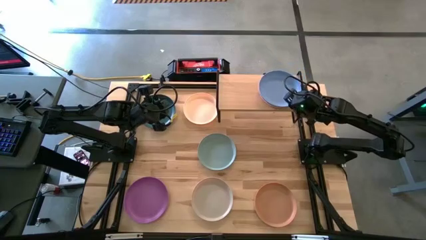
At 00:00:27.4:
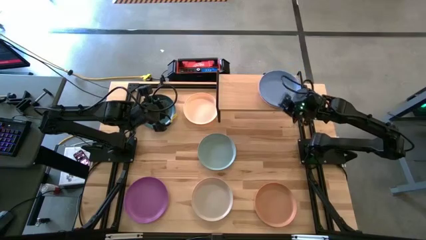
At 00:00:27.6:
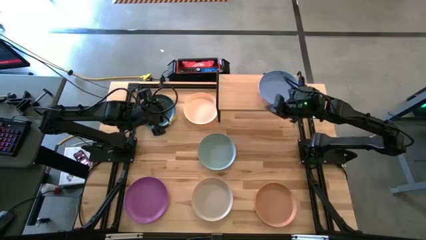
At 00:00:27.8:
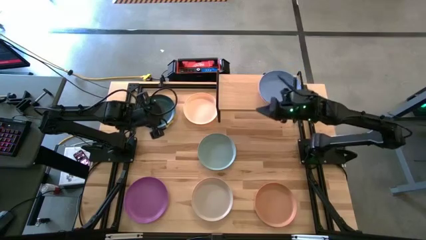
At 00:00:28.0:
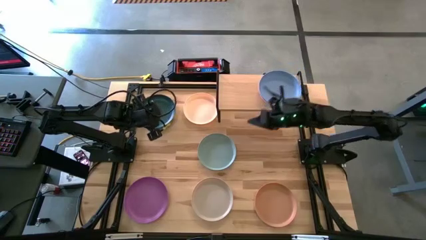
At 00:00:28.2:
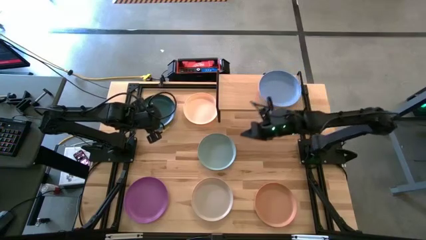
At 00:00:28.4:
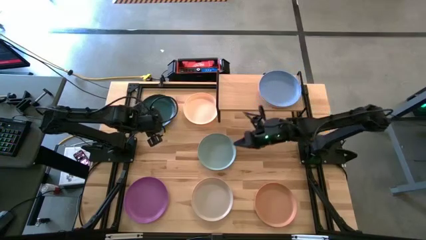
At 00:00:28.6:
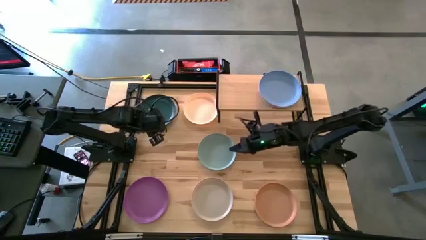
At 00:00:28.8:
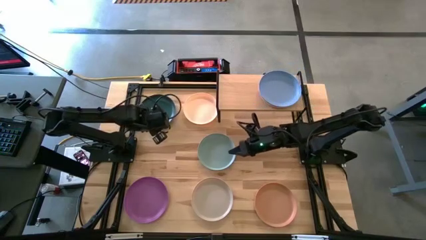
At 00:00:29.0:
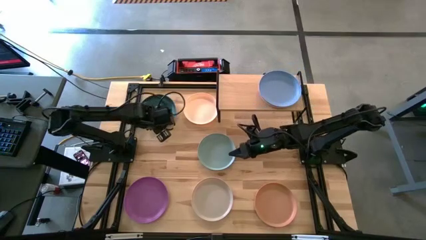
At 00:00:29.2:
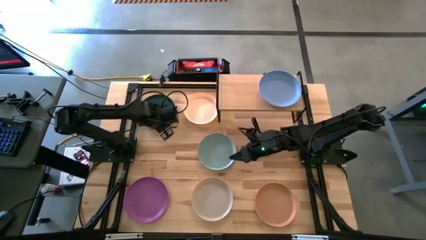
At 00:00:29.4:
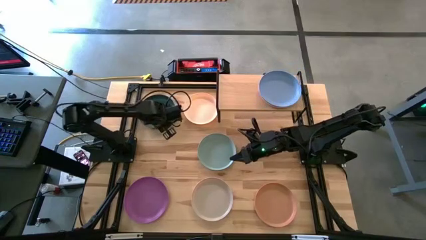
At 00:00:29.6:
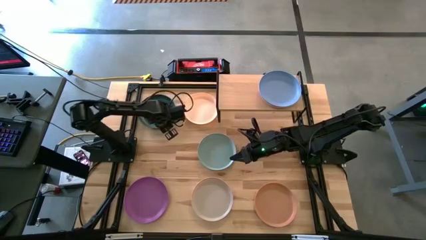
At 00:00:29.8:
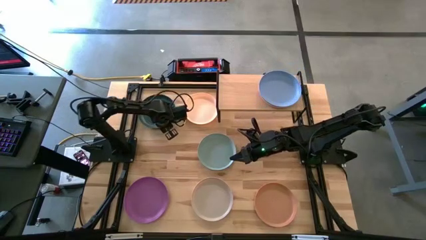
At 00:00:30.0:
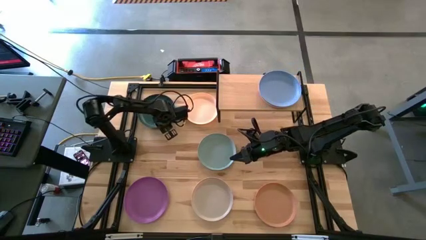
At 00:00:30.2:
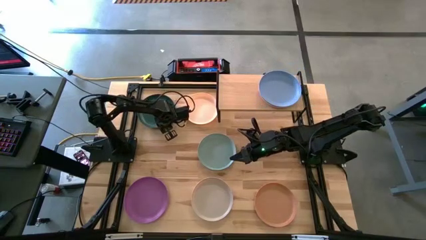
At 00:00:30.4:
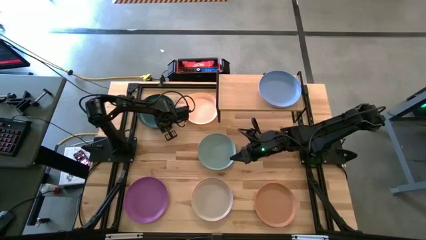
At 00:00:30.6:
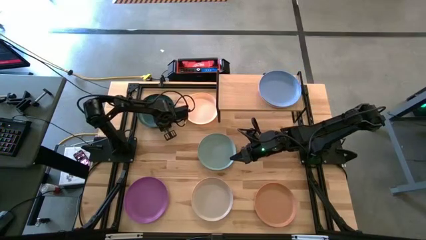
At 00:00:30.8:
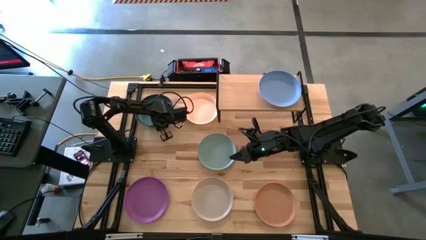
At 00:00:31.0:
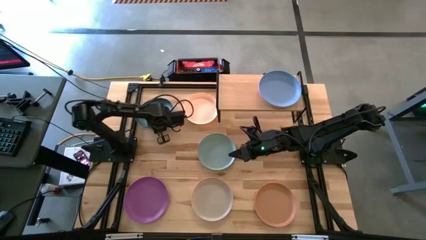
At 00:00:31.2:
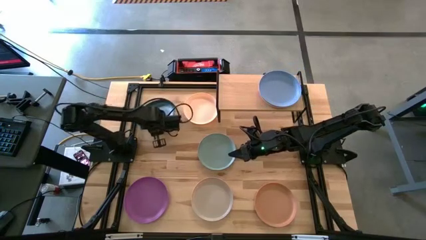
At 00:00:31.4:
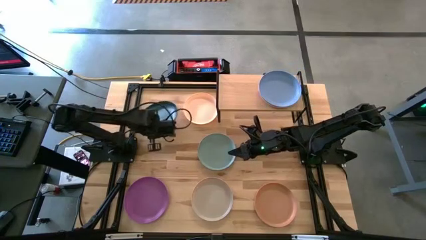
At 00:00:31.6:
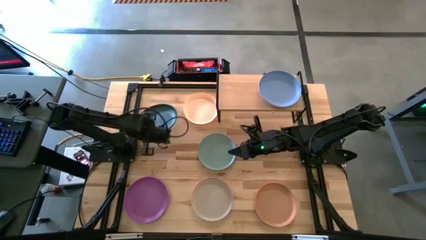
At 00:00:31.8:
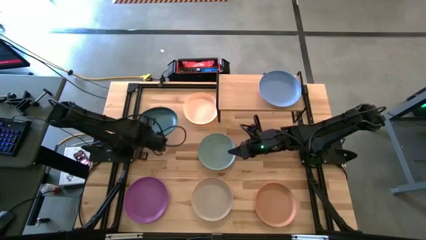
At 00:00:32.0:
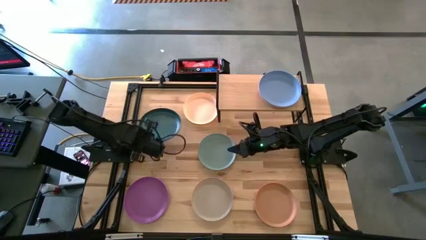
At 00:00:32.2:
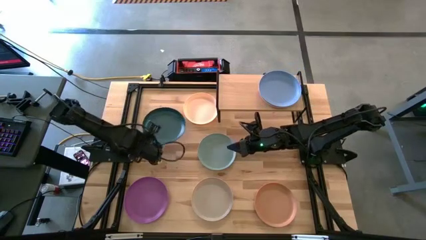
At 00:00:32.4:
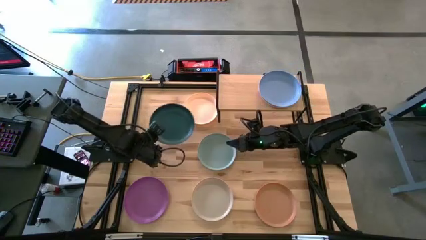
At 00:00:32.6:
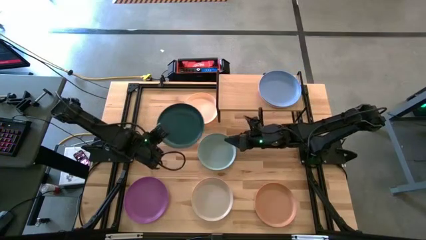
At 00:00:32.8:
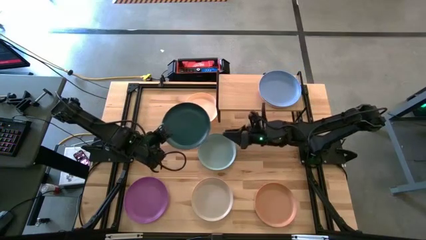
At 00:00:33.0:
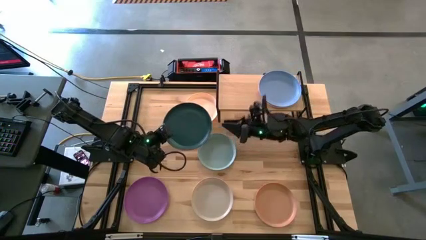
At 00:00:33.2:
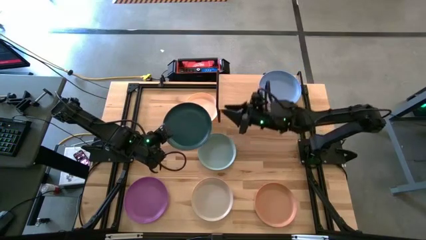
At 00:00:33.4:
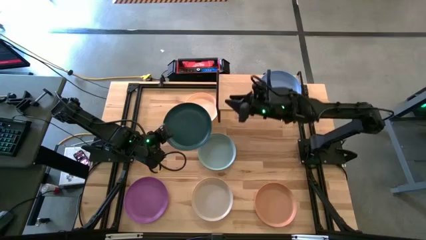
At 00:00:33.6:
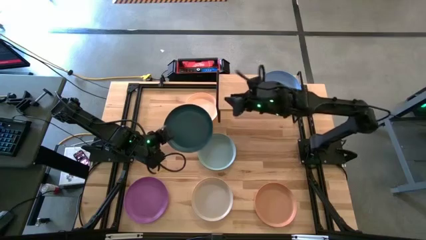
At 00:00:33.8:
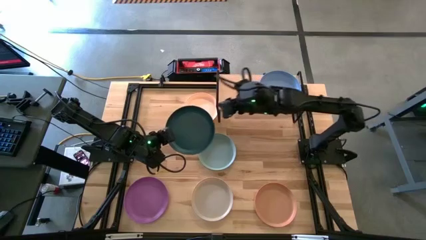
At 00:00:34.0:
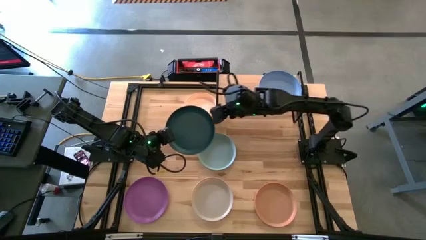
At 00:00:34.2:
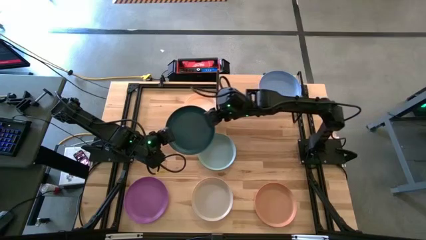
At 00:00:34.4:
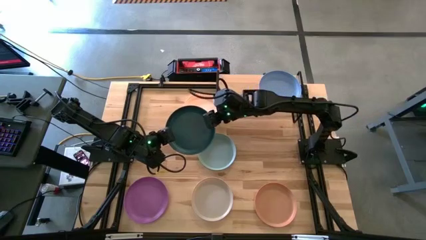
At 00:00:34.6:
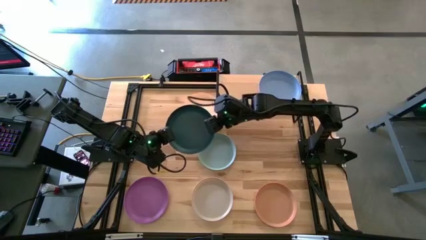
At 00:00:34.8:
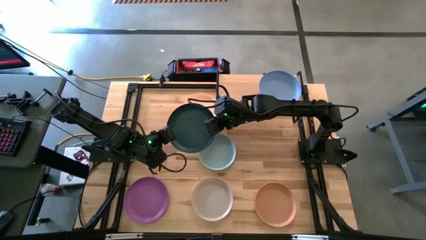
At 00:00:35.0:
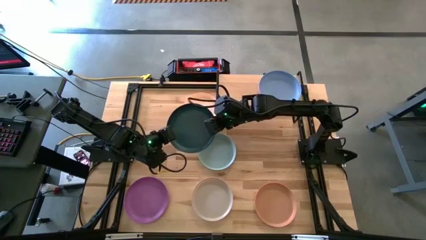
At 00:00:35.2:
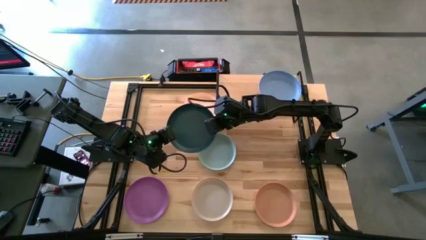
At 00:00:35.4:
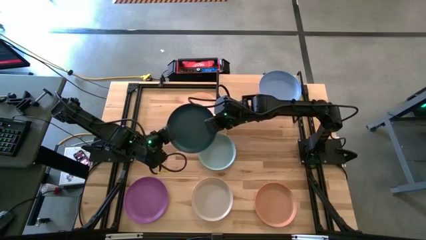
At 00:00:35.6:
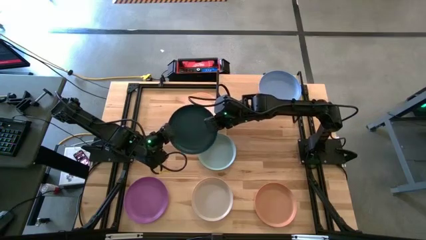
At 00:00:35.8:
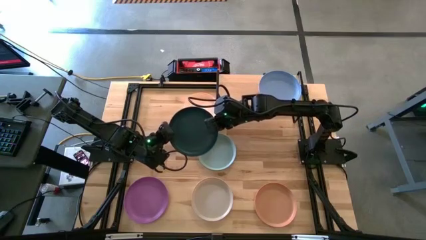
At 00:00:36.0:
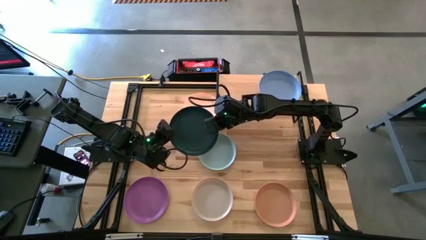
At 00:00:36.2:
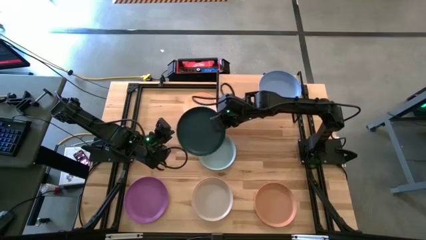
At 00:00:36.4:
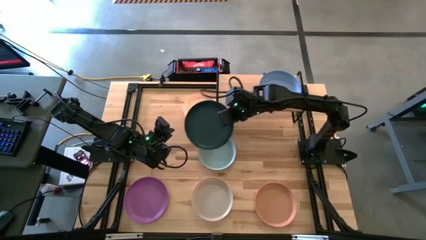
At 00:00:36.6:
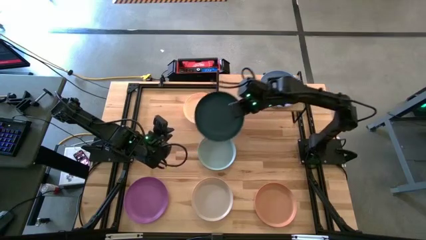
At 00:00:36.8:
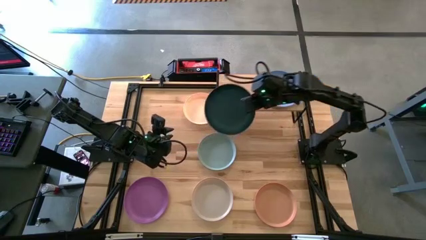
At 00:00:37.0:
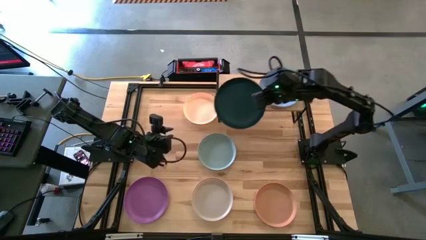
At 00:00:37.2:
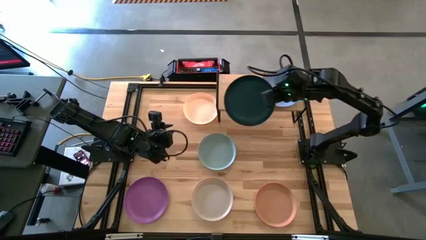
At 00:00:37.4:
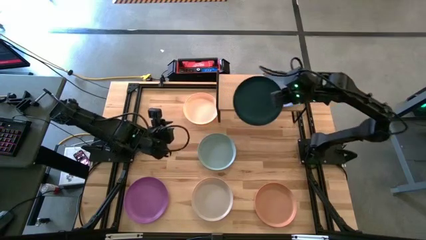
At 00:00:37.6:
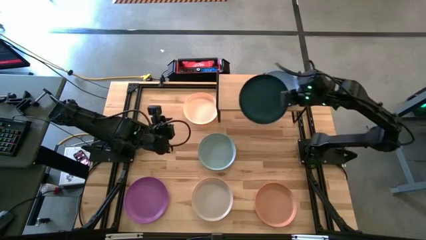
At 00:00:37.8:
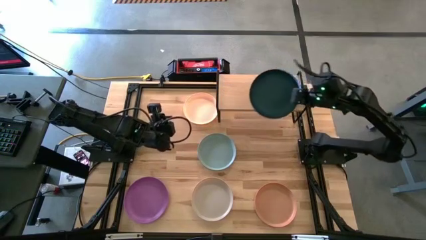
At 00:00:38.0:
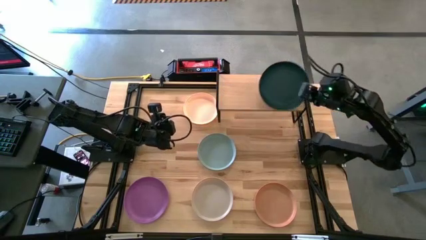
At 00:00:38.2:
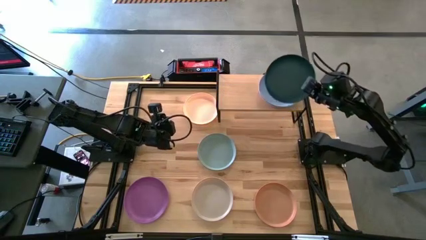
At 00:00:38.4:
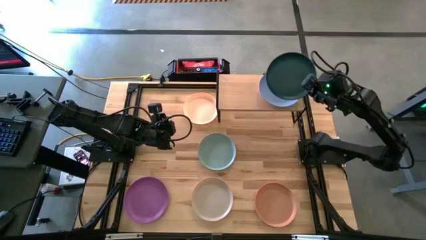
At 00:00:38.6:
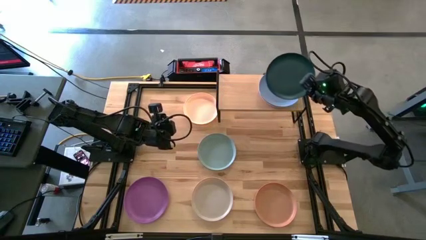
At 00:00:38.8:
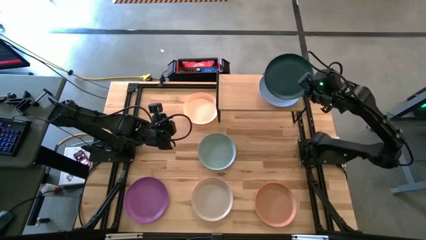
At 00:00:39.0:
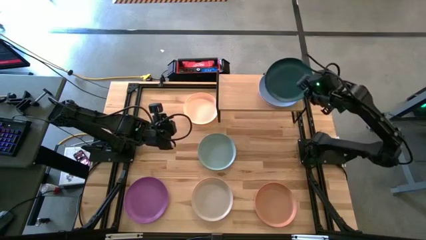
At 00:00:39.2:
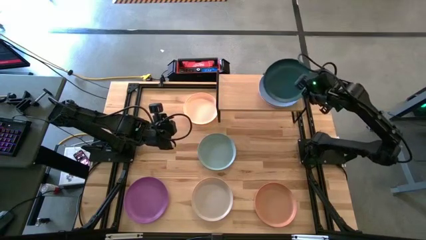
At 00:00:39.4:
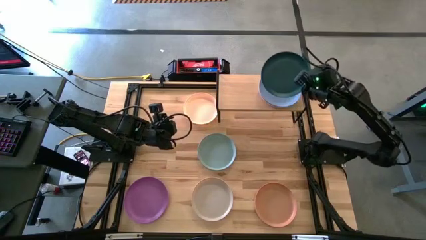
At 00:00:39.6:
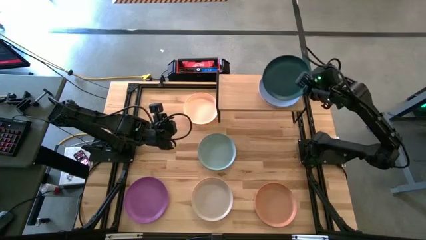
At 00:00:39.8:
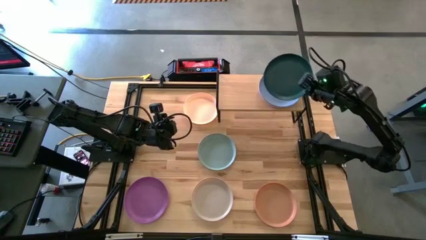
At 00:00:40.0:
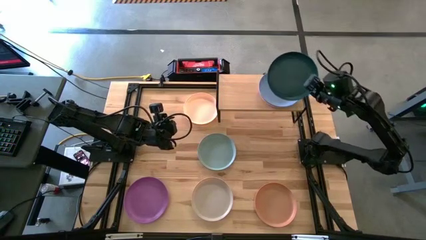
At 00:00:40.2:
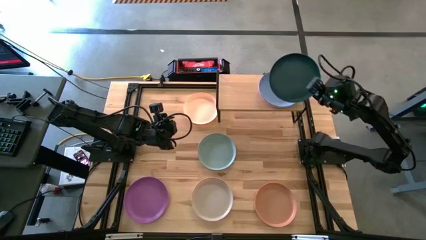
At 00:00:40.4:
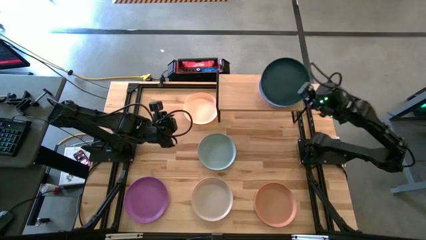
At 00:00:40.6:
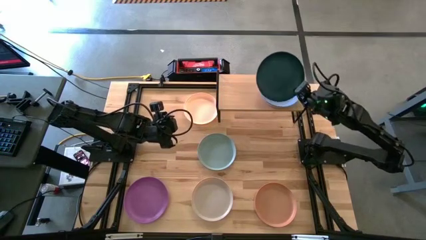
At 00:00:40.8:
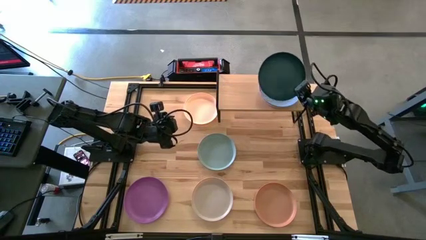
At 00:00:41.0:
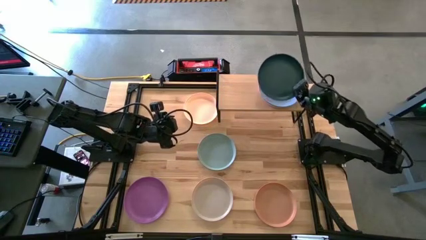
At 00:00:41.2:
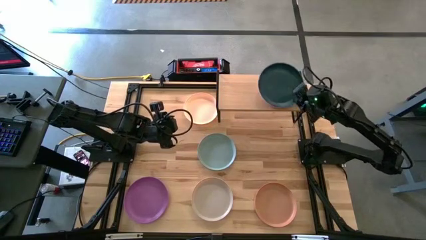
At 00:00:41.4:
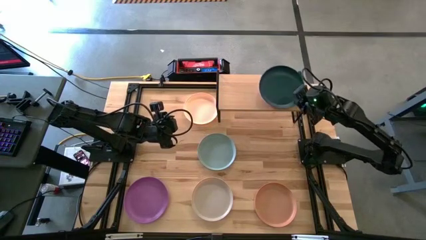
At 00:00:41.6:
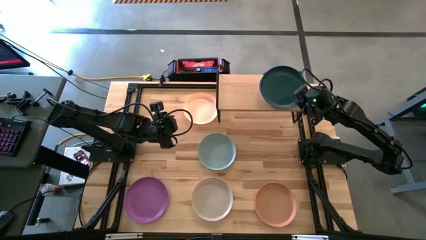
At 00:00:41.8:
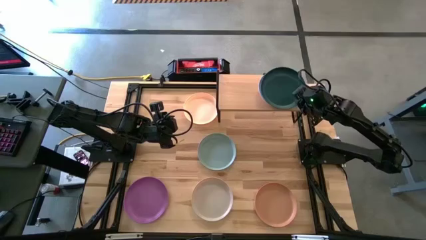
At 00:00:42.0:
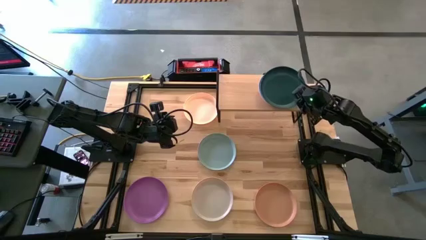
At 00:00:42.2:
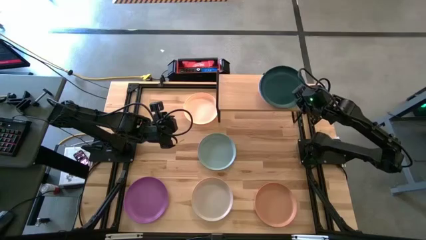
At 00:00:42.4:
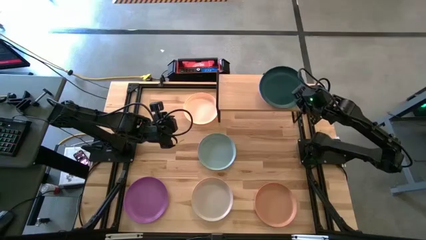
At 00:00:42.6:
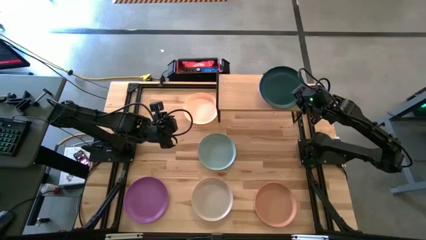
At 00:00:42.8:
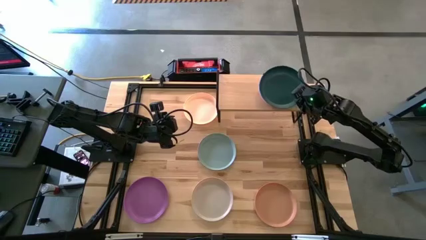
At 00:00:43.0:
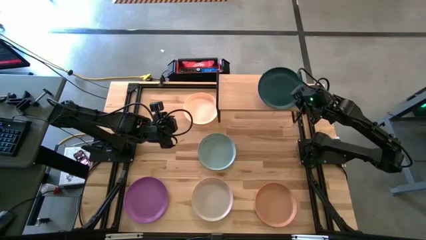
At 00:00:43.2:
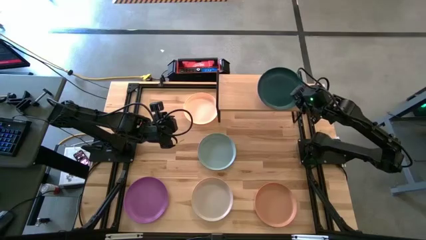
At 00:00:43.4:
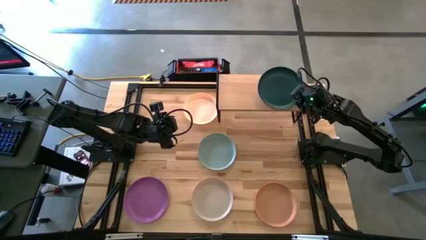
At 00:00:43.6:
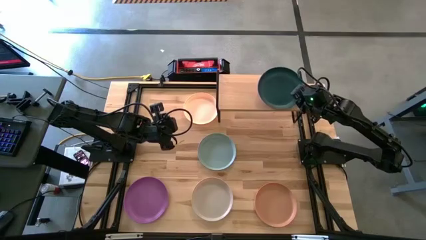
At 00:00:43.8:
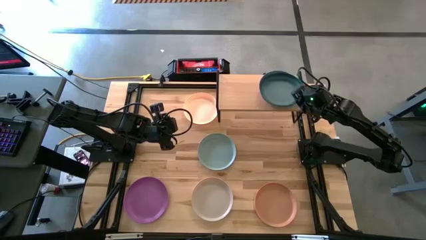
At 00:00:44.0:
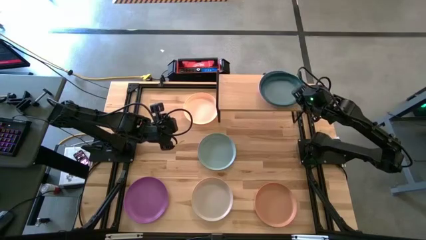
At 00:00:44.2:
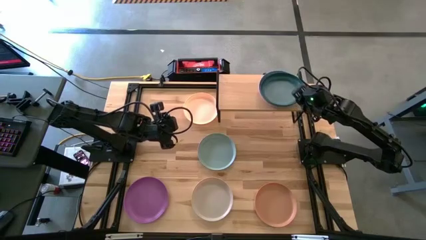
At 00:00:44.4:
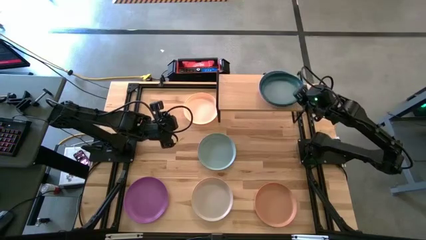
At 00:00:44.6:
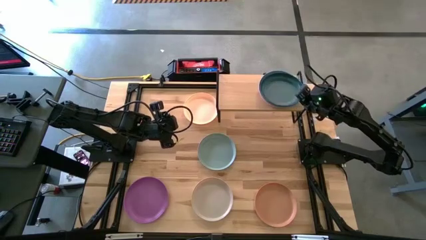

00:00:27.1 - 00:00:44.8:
Task: Place and stack plates onto a shelf
Stack the green plate on top of the blue plate on the shelf
